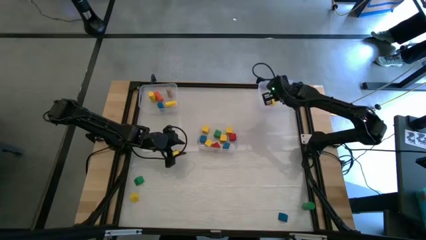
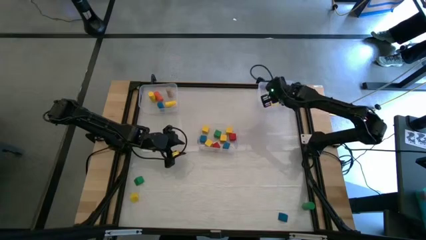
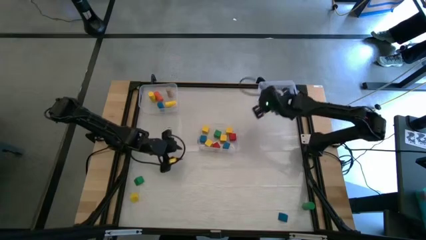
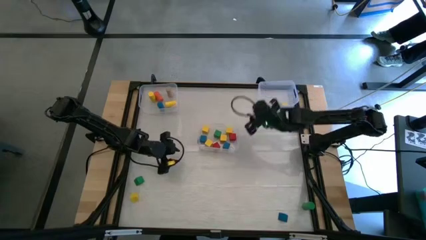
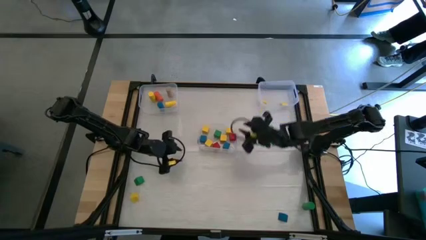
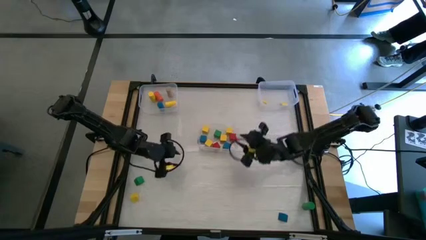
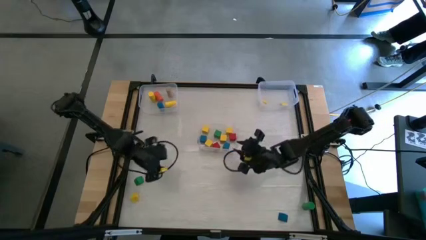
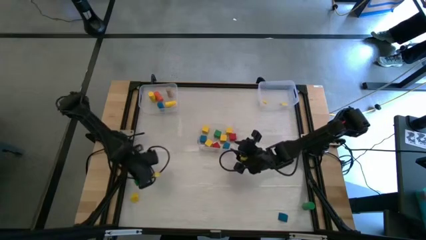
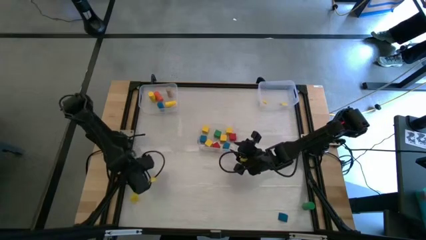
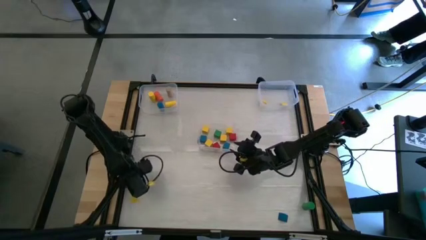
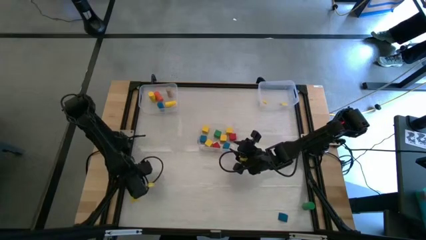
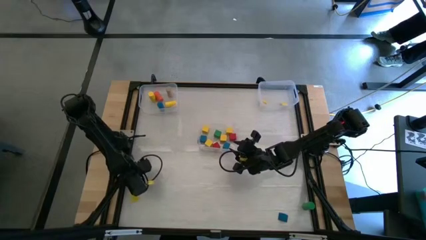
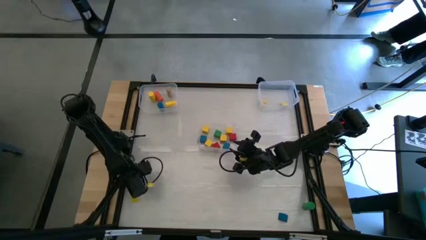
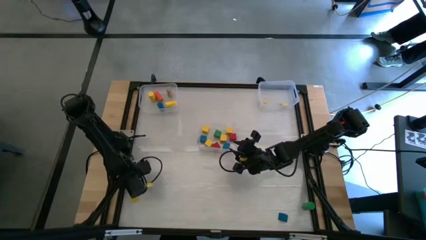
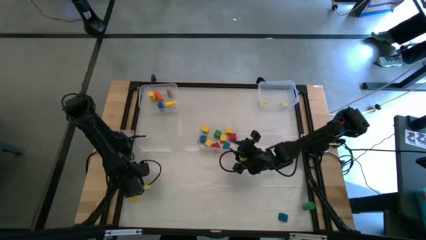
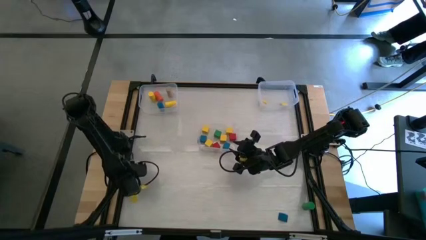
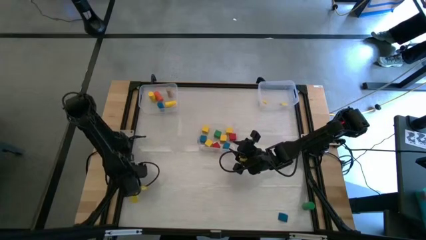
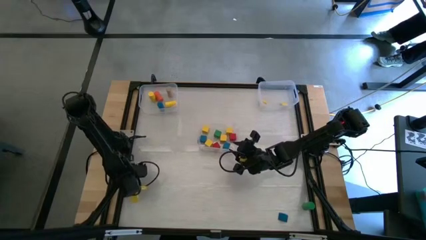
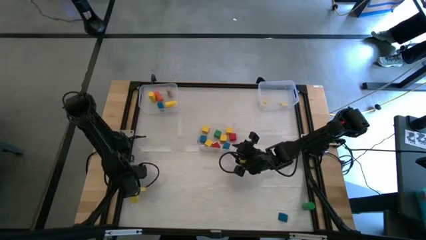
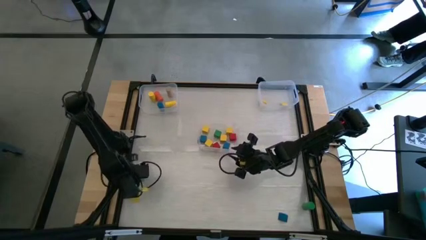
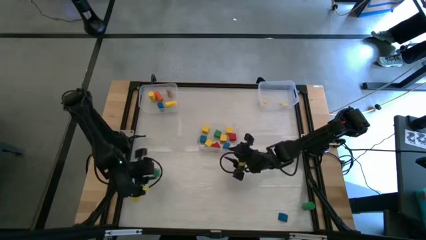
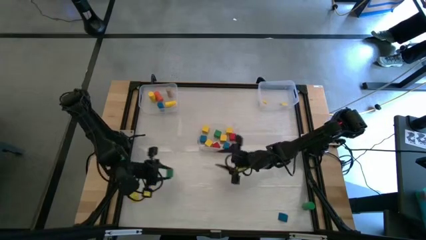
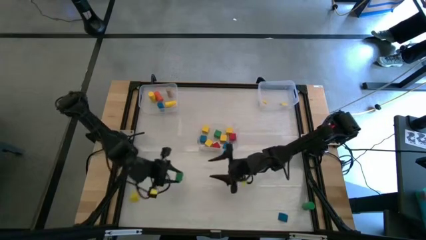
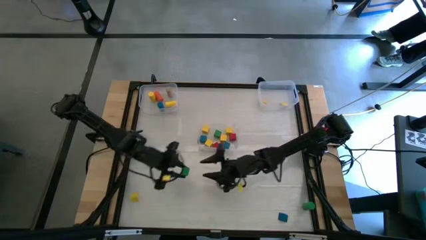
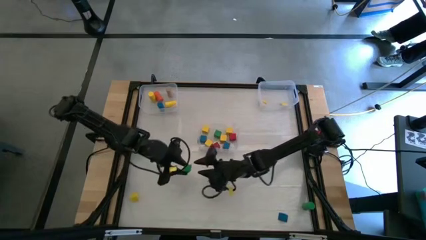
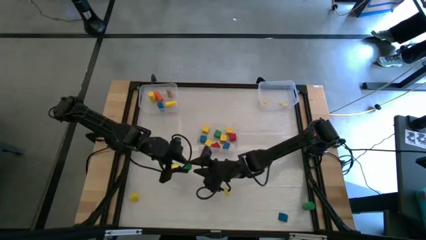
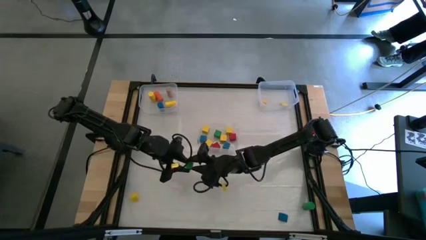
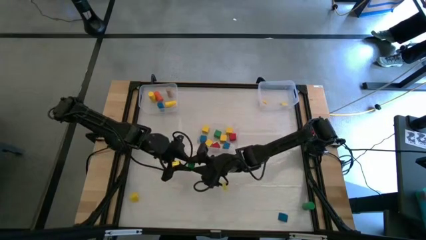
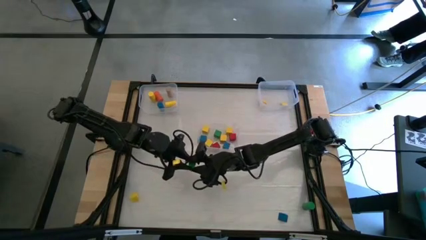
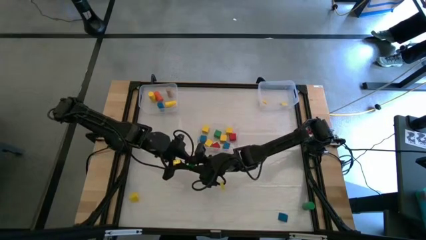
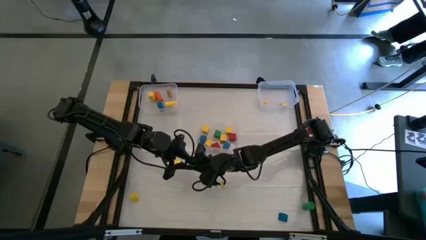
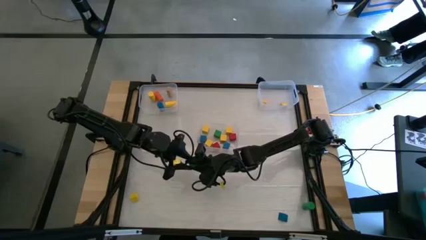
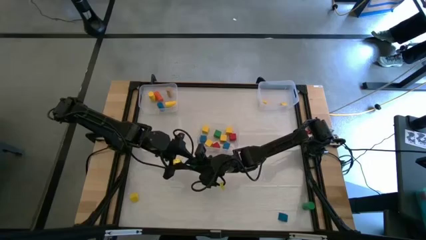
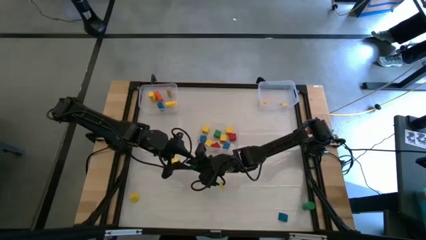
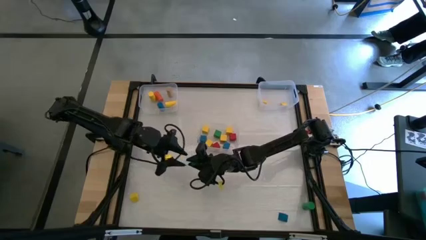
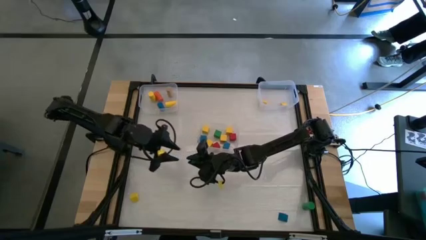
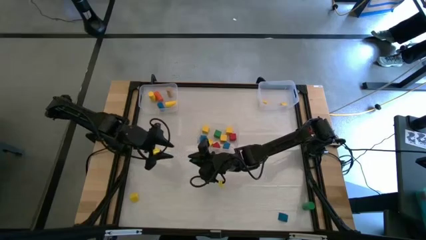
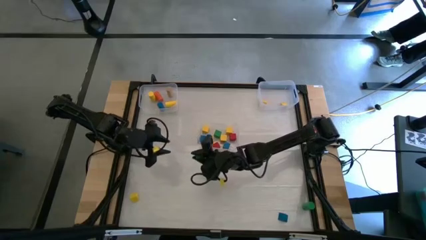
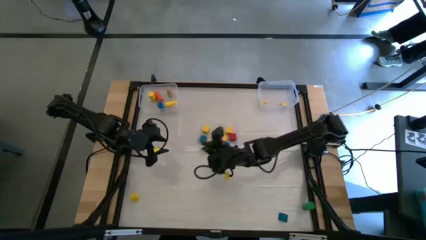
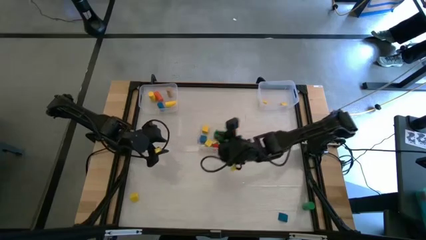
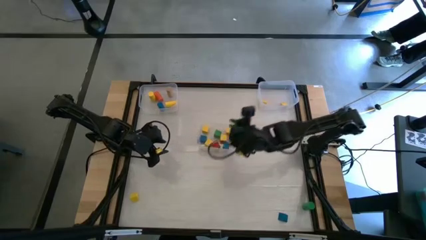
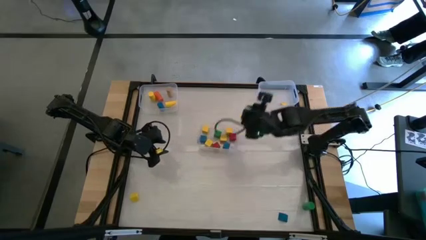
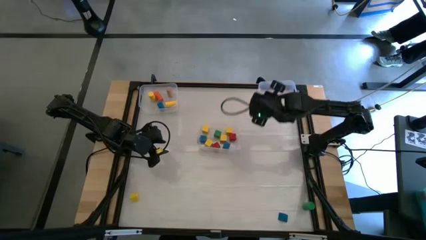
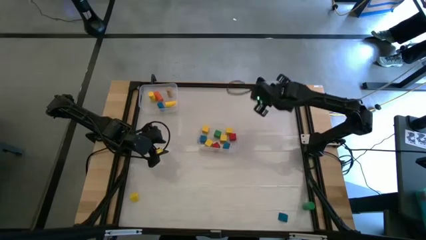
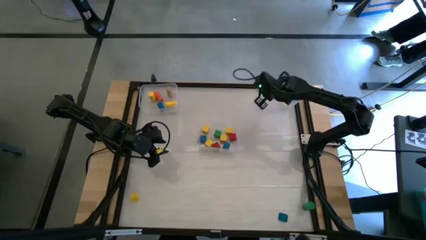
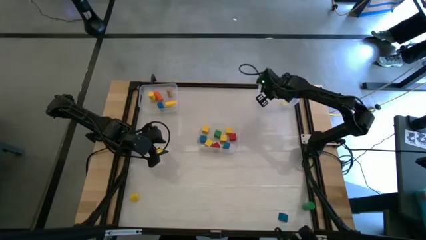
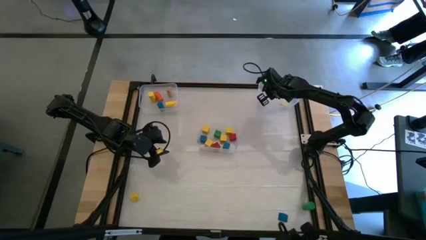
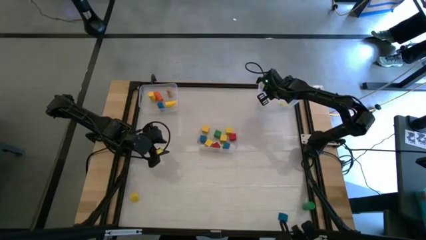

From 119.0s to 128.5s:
Task: Sort blocks by size
Put the green triangular block into the top right transparent bin

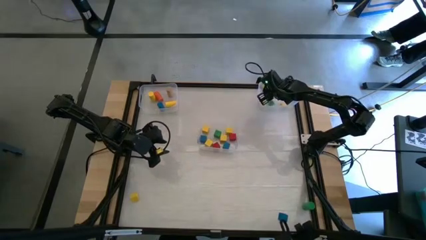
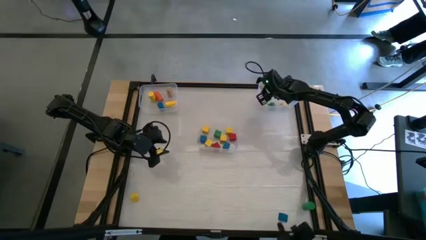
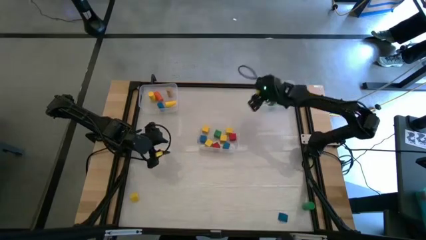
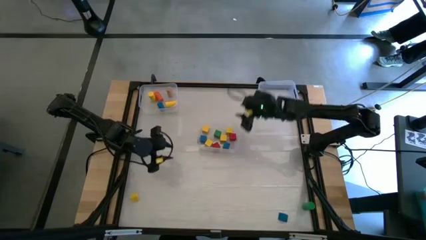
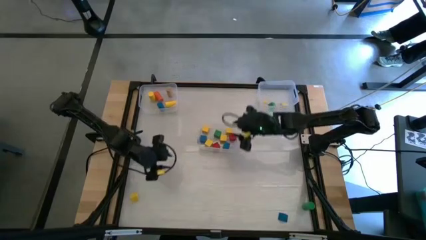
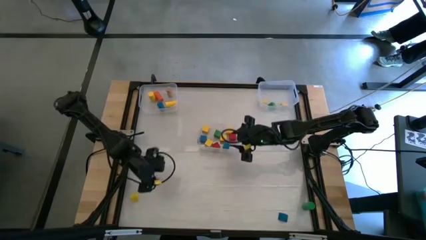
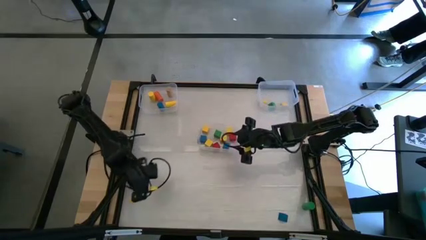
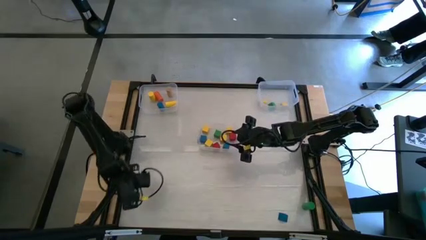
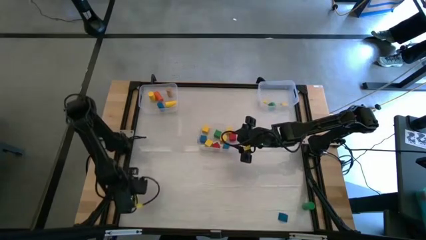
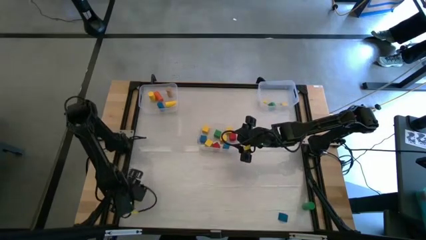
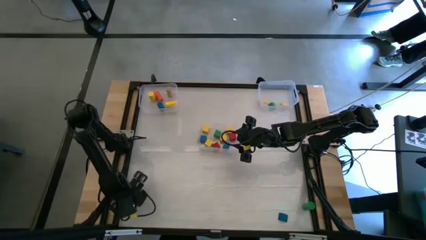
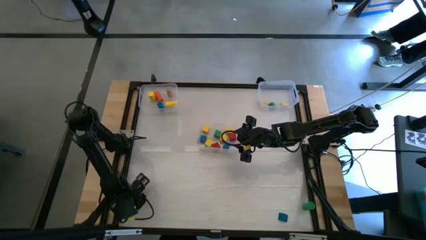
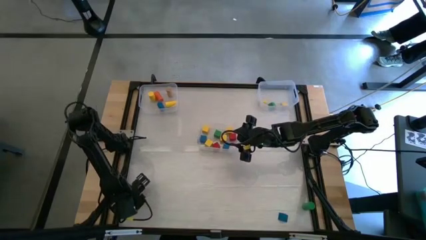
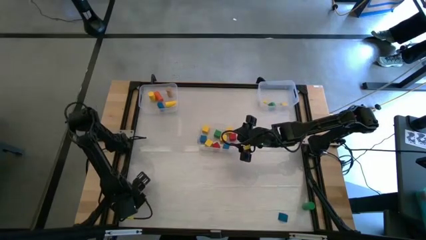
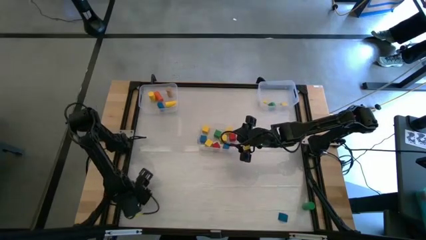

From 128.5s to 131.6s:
Put the yellow triangular block into the top right transparent bin

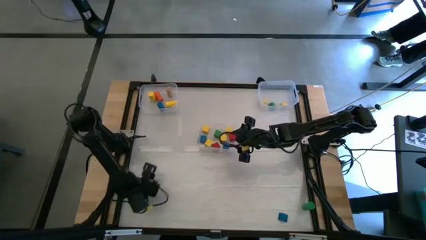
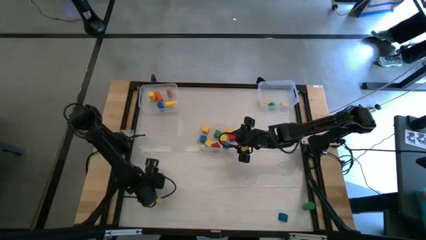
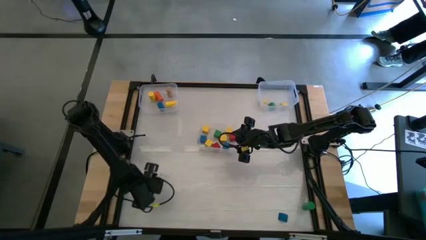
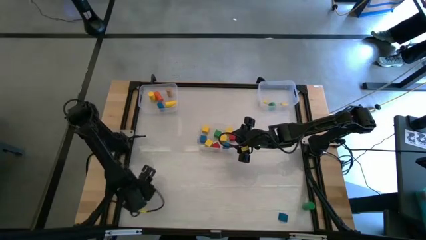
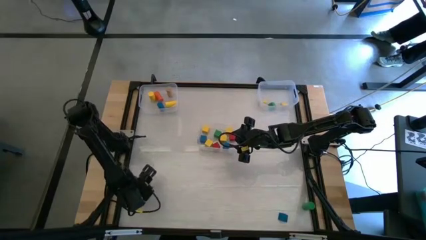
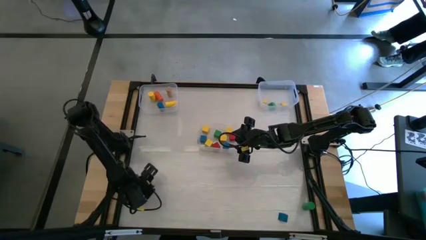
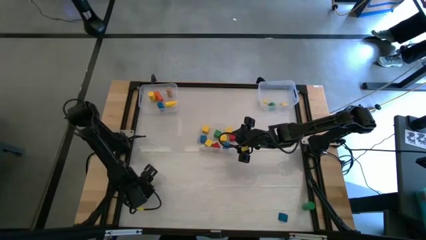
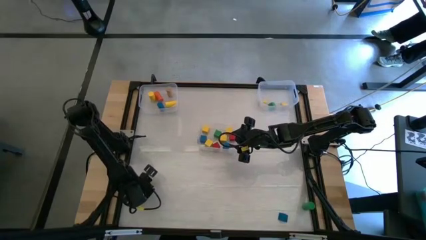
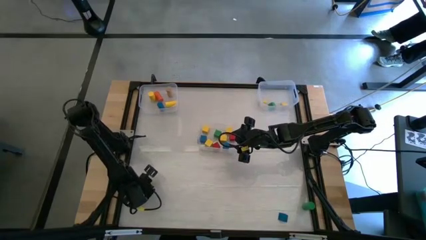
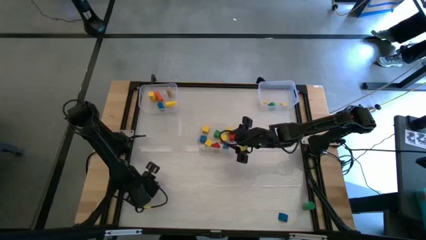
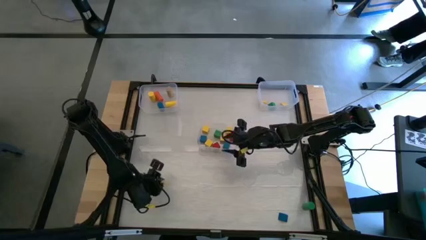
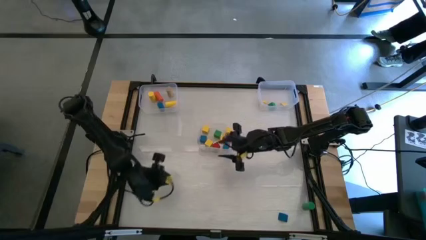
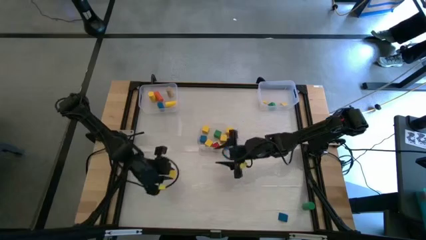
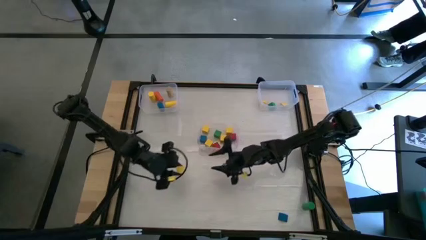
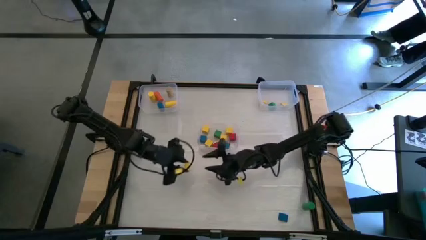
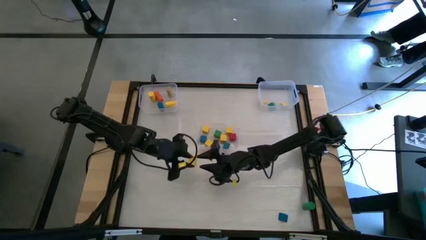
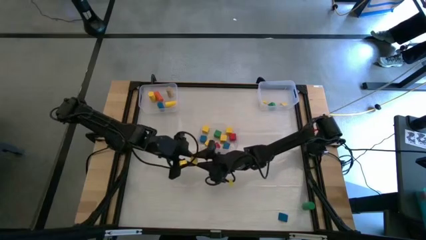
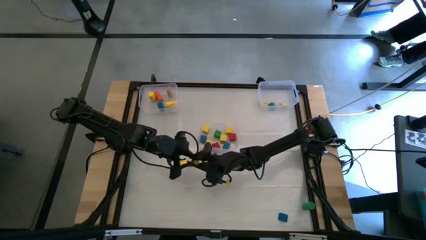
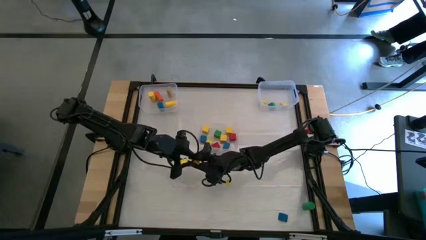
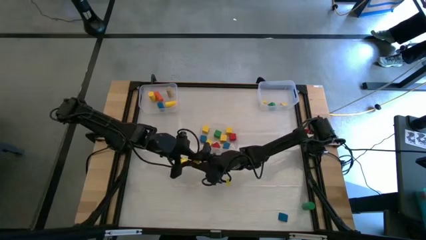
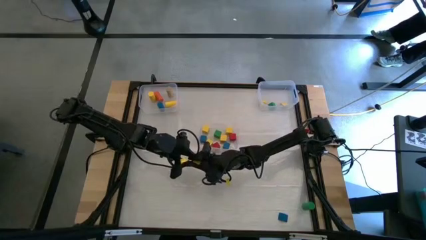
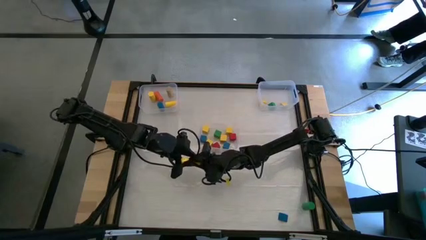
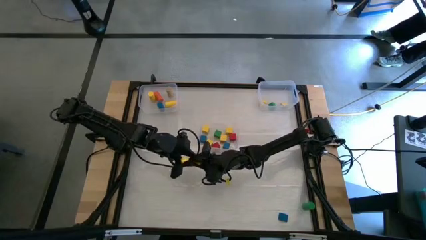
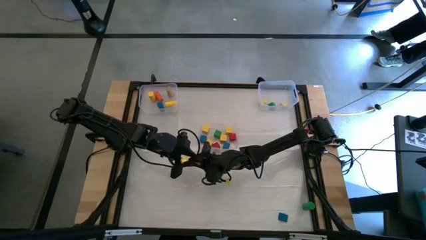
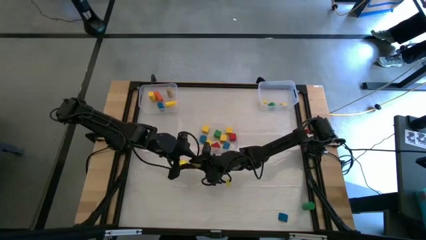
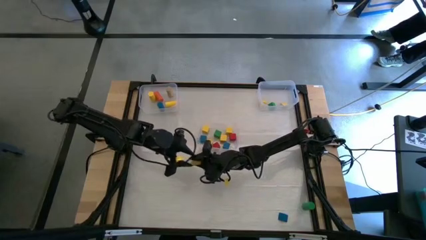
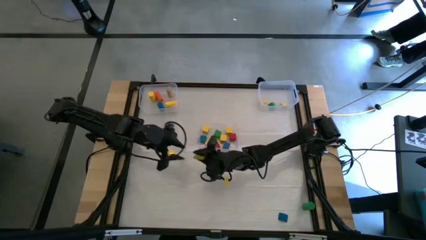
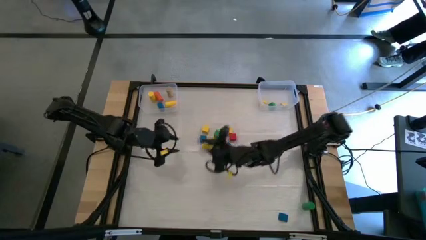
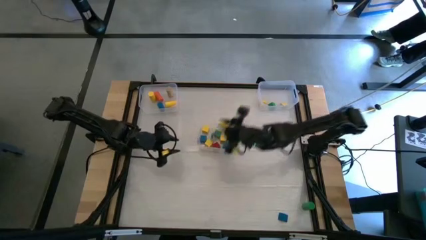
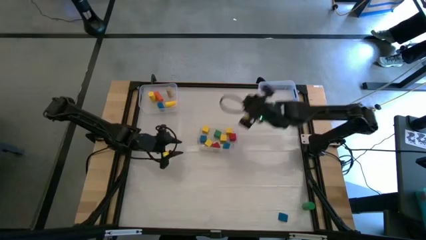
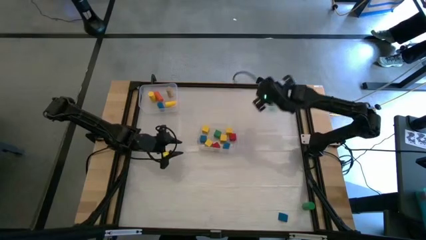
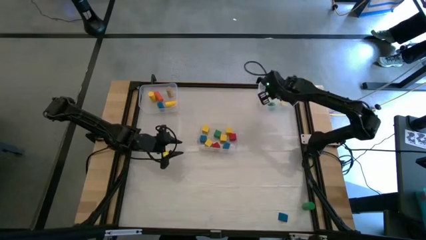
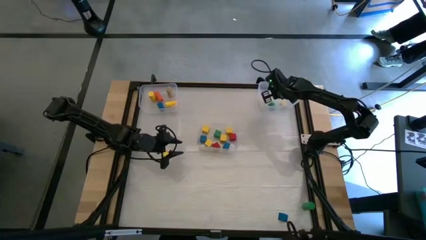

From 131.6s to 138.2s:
Put the yellow triangular block into the top right transparent bin
